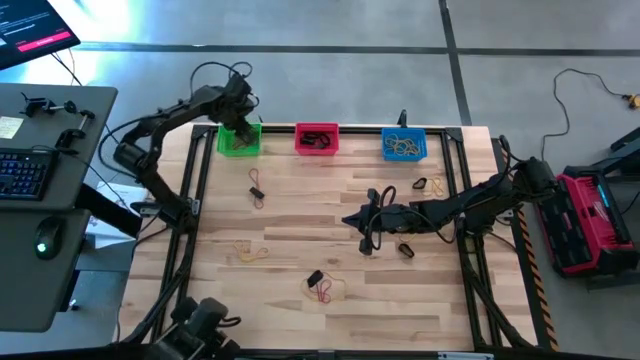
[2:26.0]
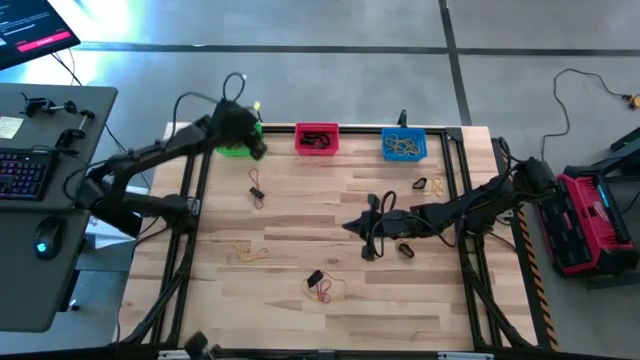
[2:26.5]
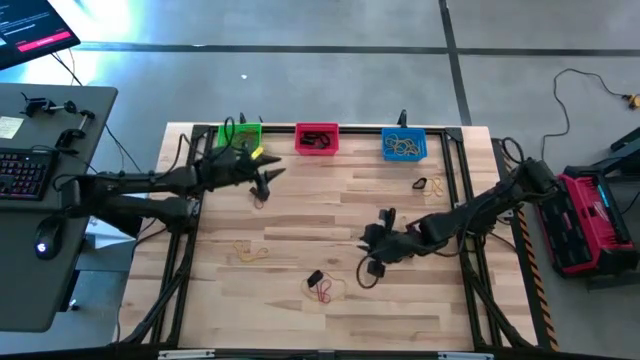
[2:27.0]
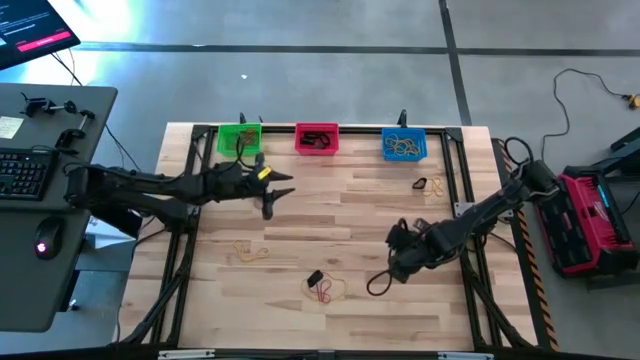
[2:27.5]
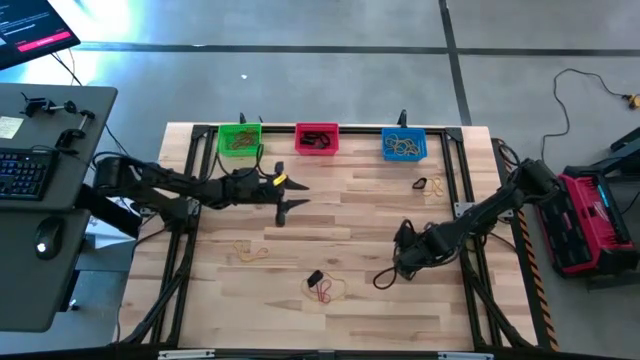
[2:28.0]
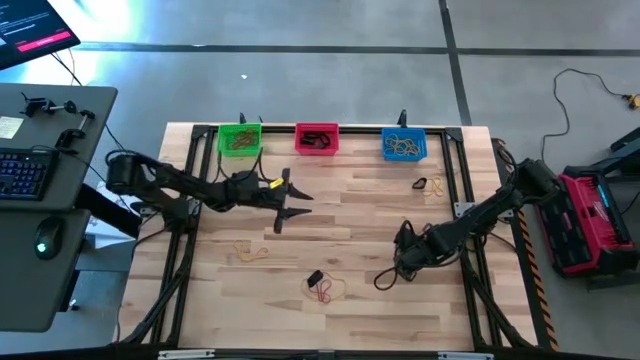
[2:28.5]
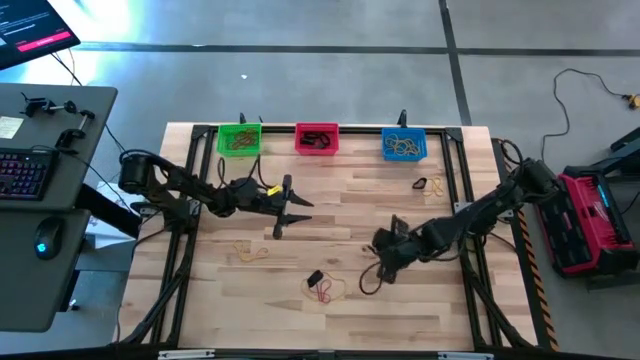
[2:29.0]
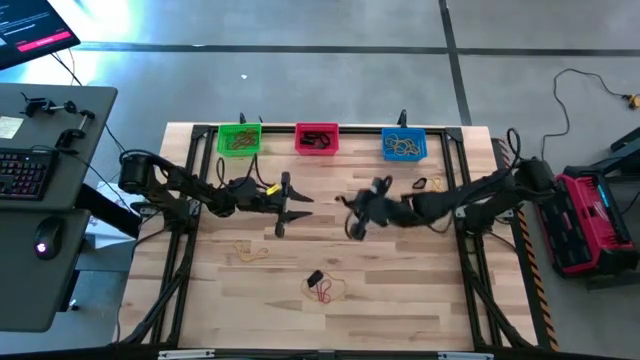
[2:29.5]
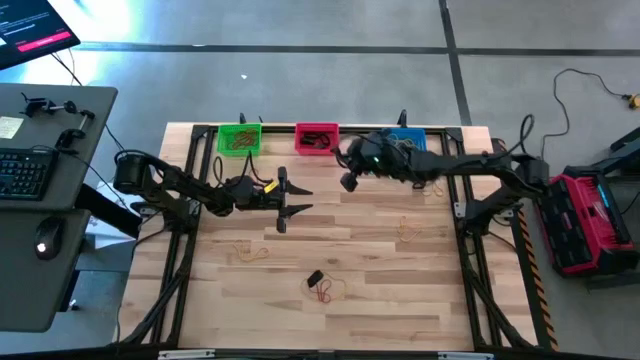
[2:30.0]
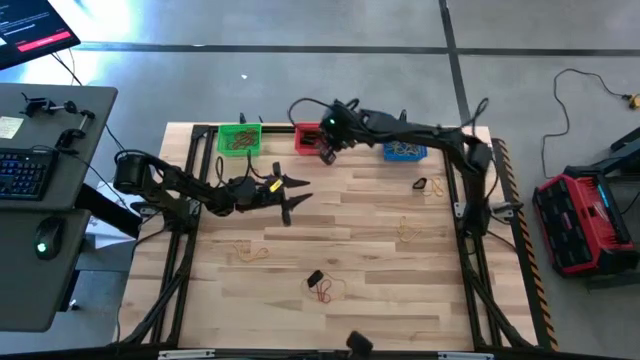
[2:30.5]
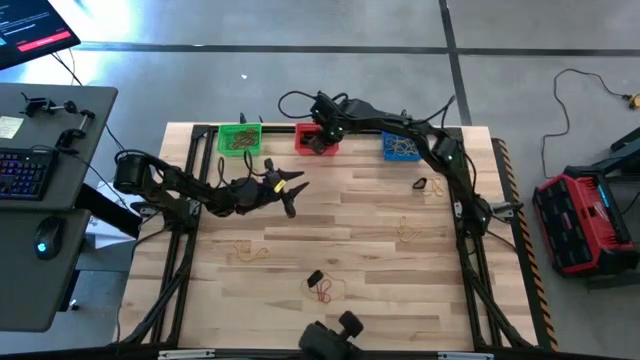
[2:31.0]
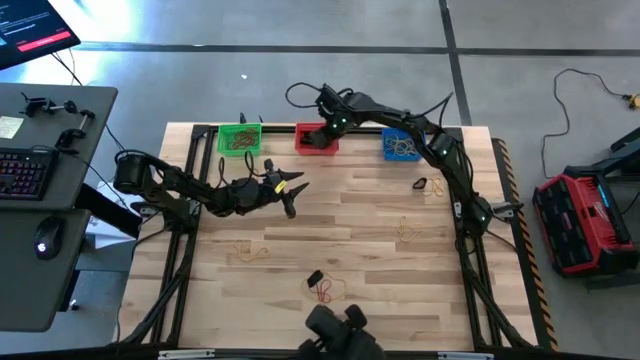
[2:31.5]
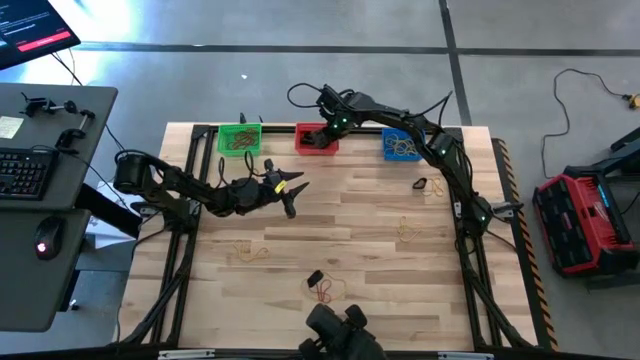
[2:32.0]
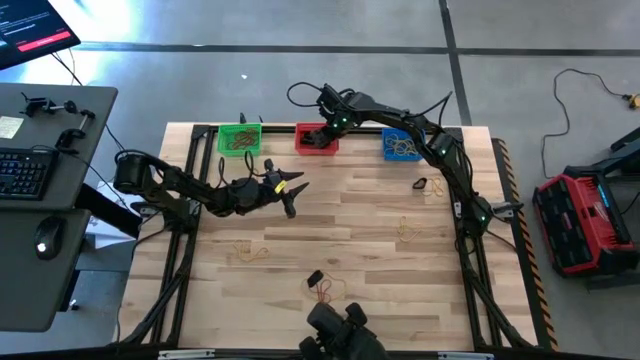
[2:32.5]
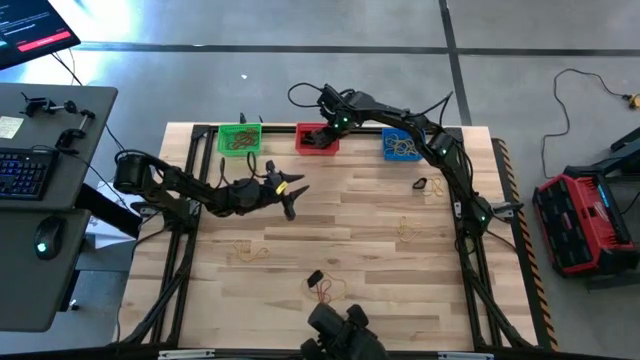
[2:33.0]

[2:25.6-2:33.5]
Task: Sort rubber bands into baskets
Put the black rubber band into the red bin

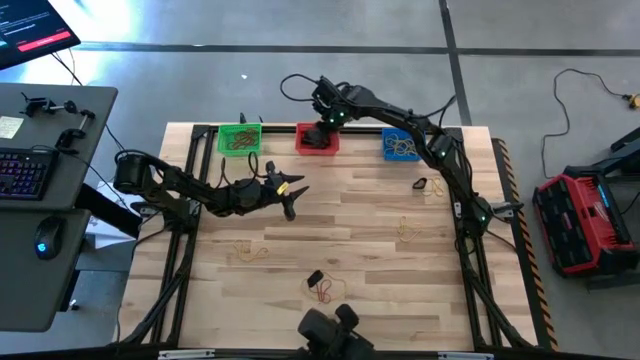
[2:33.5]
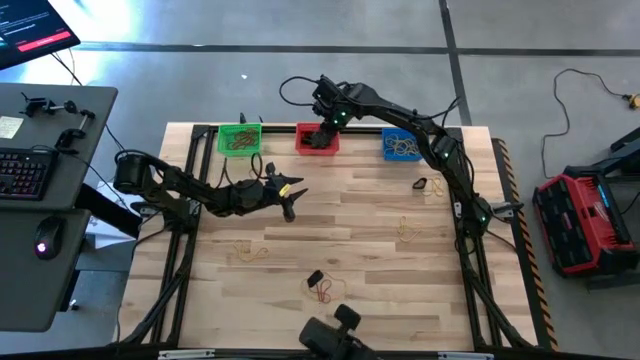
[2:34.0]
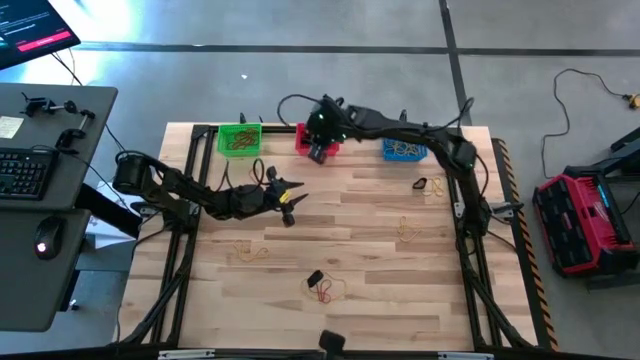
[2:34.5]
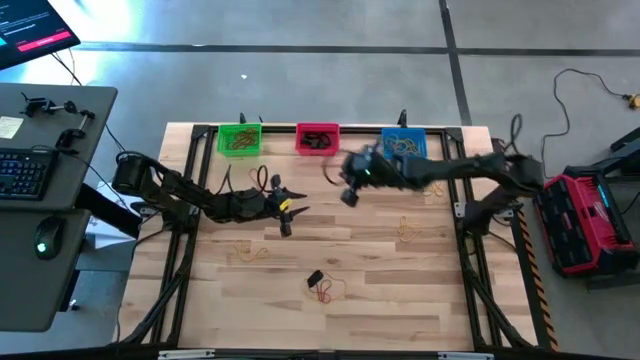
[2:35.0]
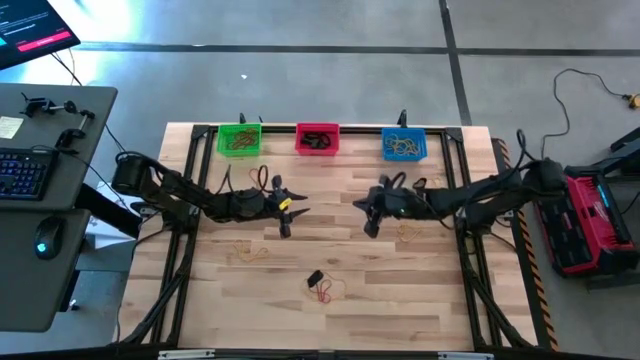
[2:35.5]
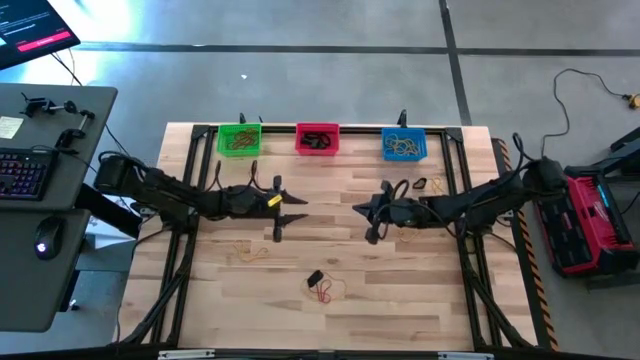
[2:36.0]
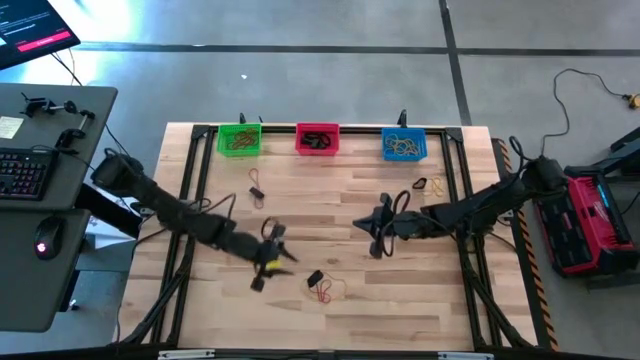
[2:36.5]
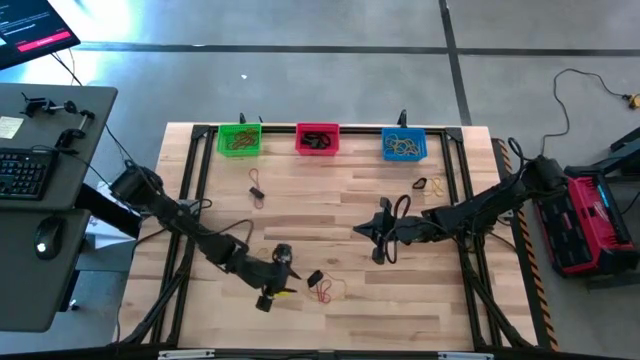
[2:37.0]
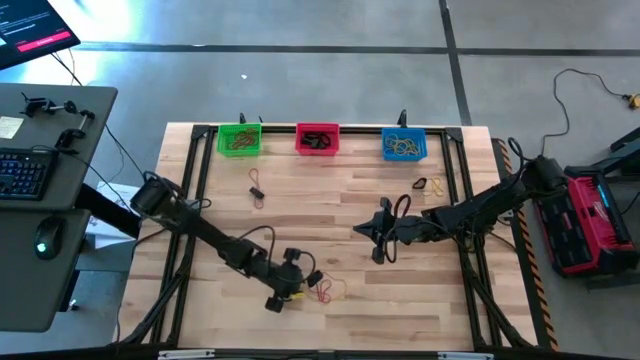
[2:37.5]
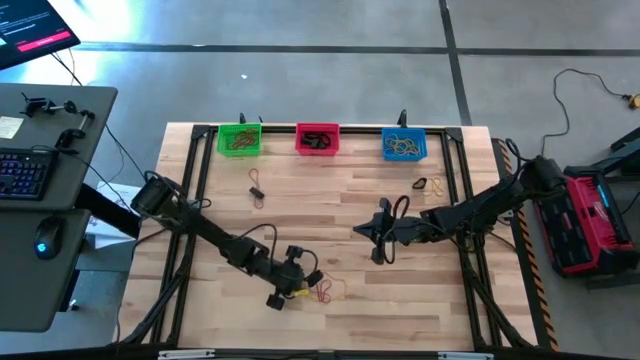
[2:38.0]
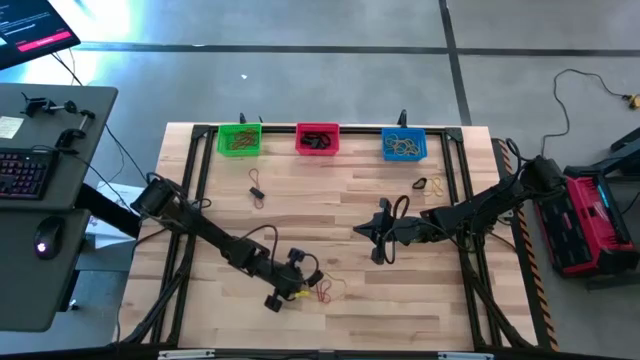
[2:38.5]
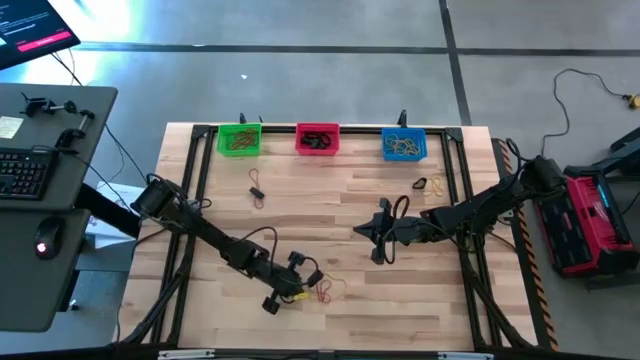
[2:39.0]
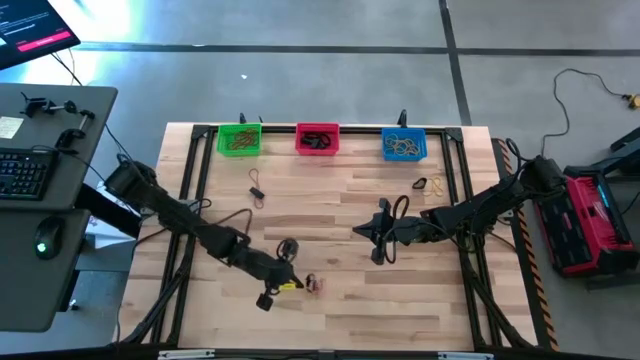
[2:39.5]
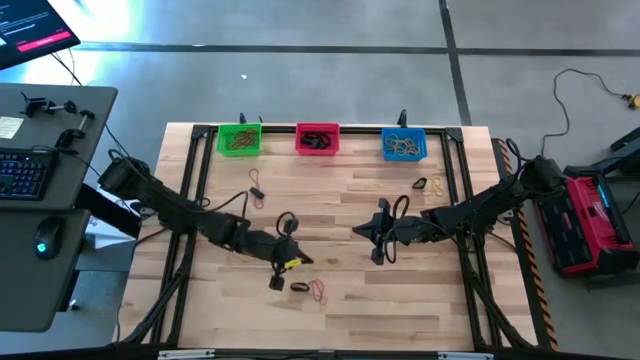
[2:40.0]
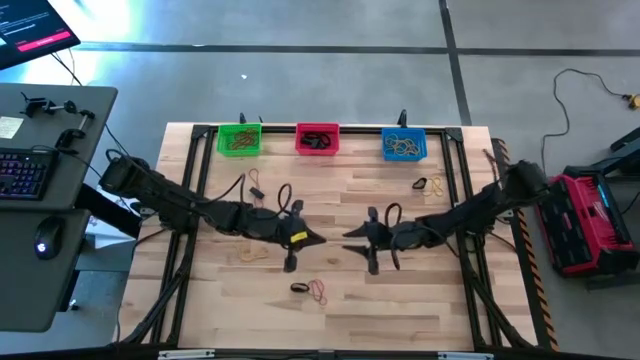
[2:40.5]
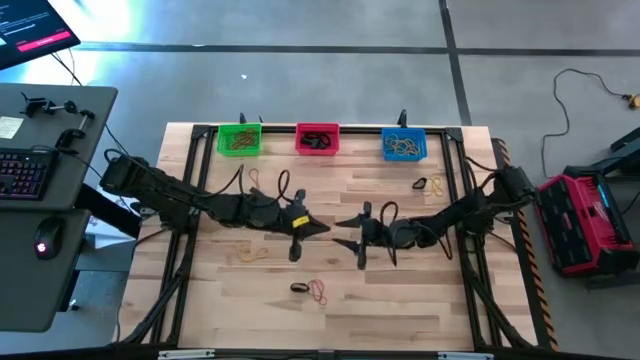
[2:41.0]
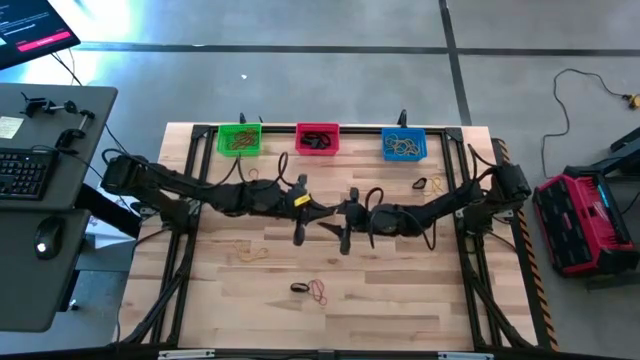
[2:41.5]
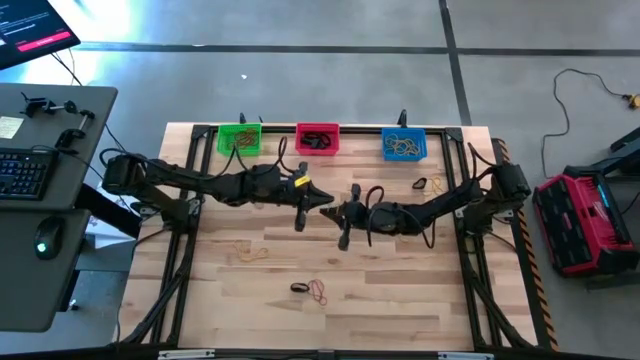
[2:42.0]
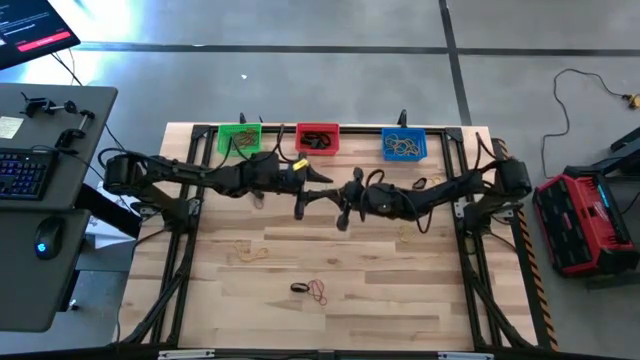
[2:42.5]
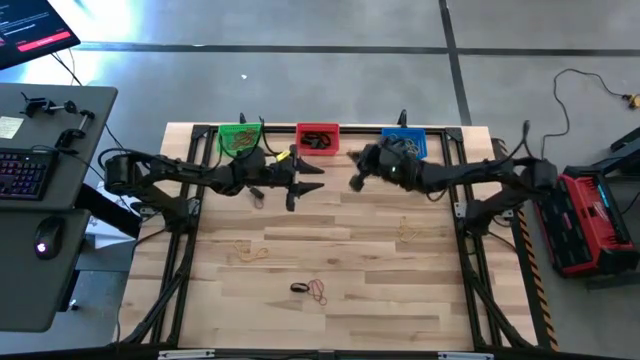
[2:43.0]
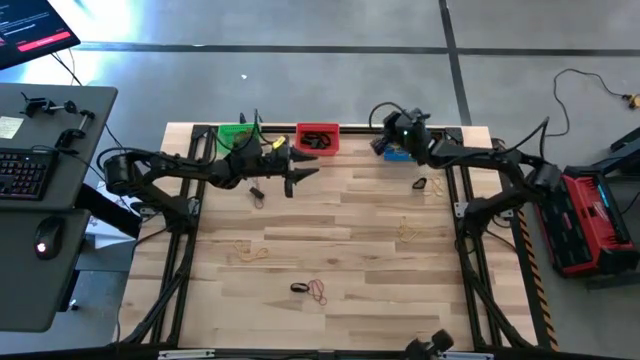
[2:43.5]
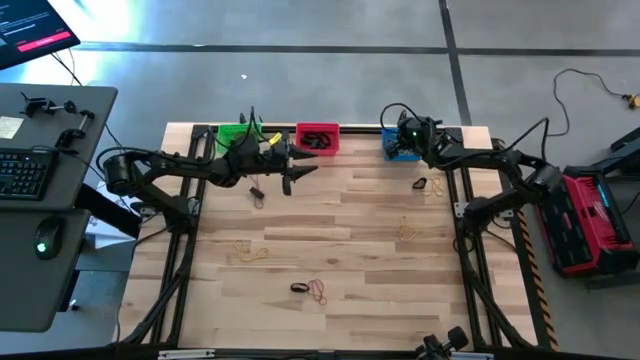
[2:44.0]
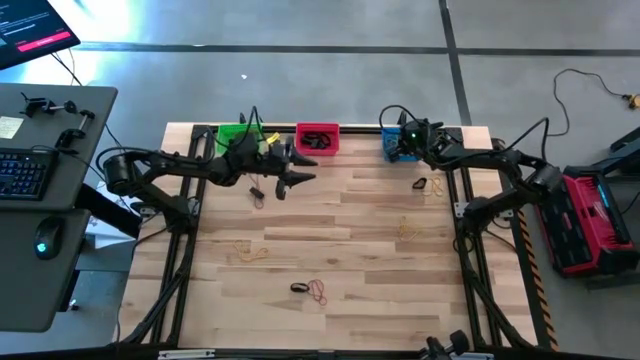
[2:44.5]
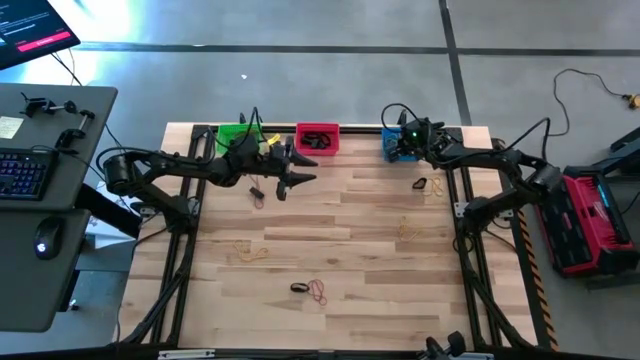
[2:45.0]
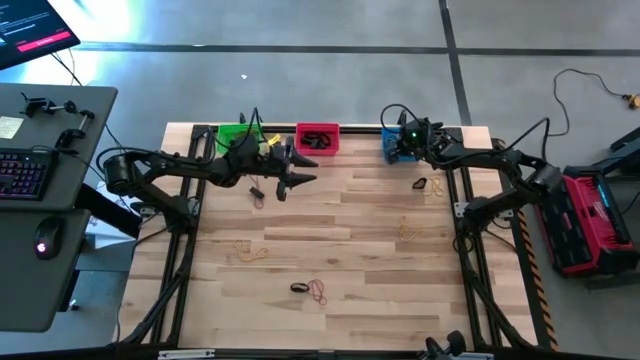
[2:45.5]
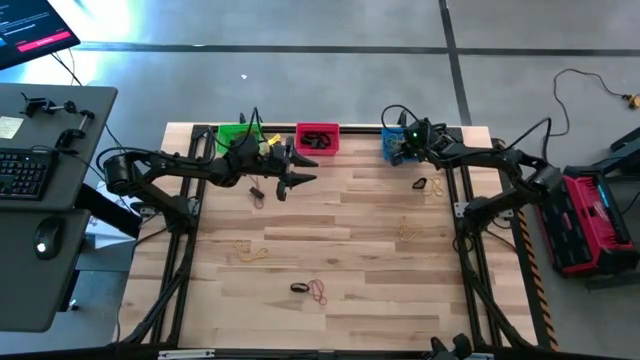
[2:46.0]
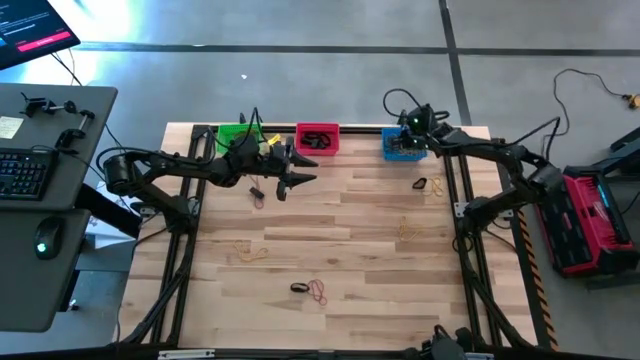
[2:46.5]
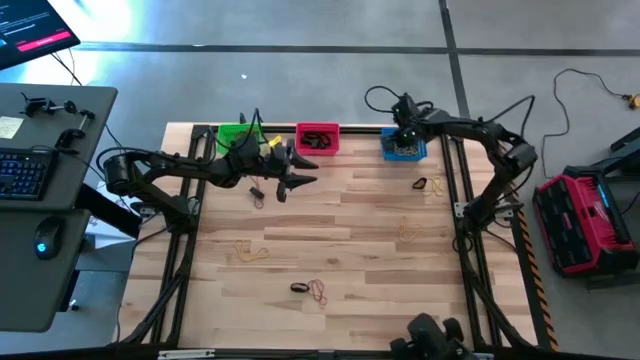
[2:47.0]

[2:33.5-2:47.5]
Put the yellow rubber band into the blue bin
